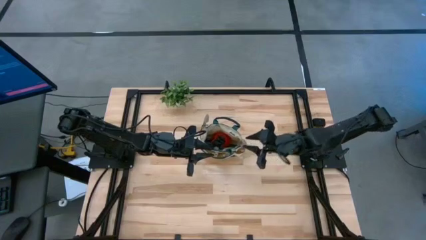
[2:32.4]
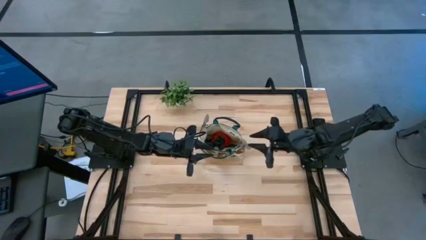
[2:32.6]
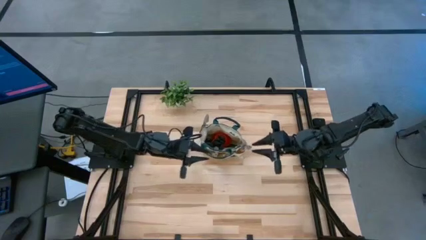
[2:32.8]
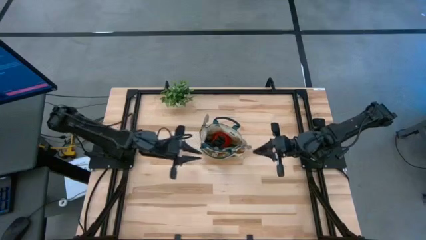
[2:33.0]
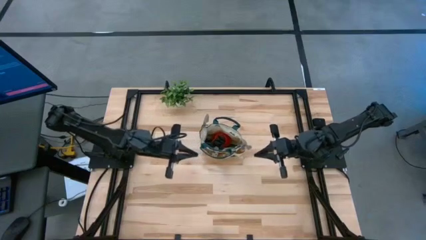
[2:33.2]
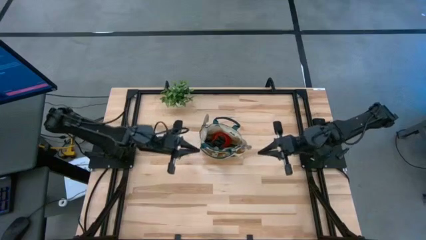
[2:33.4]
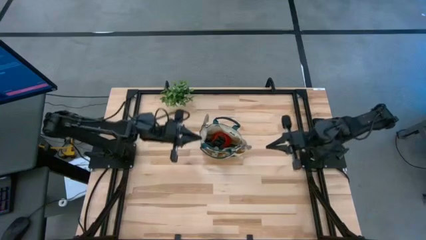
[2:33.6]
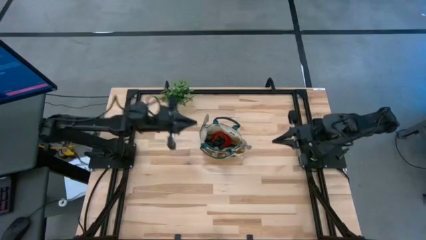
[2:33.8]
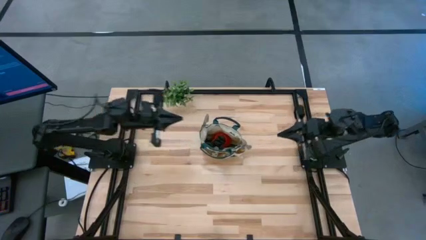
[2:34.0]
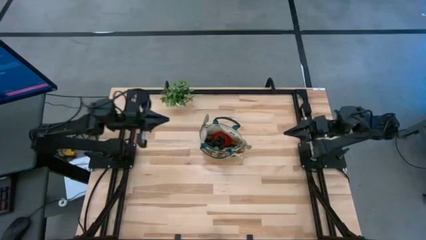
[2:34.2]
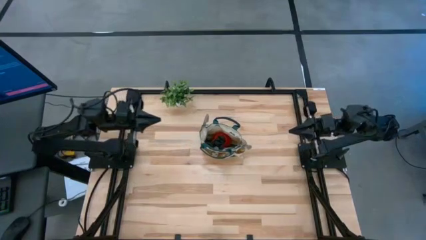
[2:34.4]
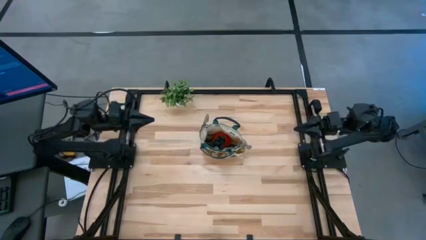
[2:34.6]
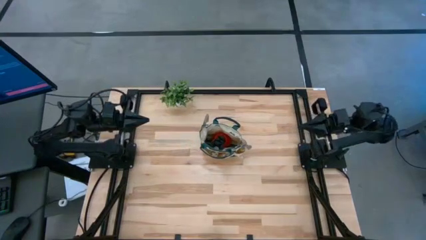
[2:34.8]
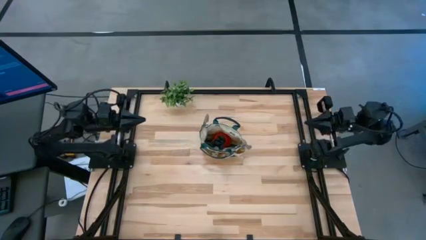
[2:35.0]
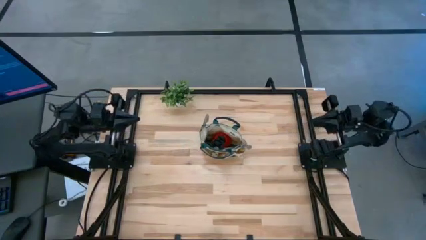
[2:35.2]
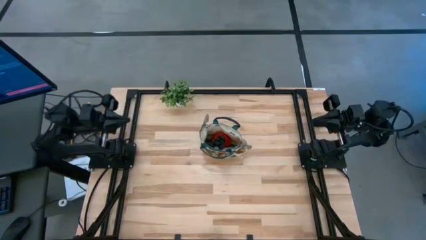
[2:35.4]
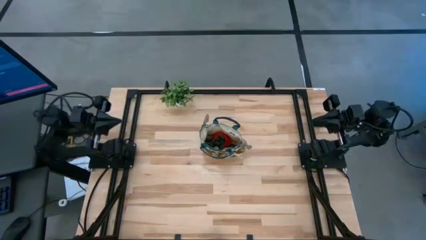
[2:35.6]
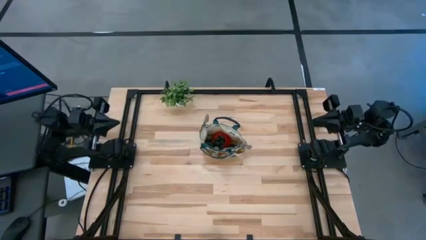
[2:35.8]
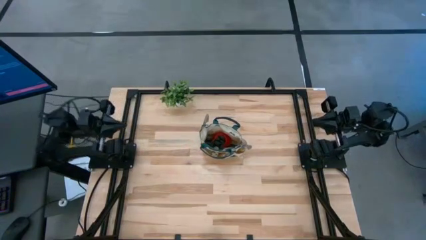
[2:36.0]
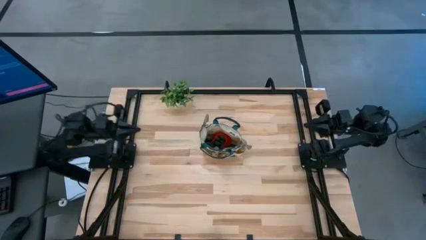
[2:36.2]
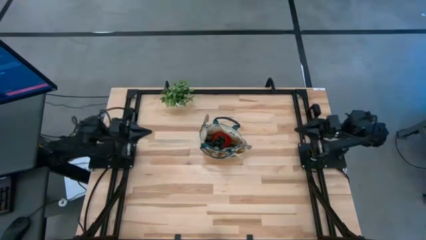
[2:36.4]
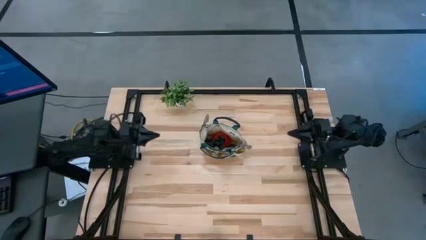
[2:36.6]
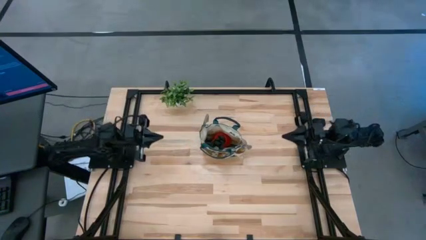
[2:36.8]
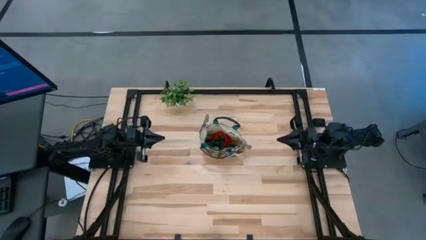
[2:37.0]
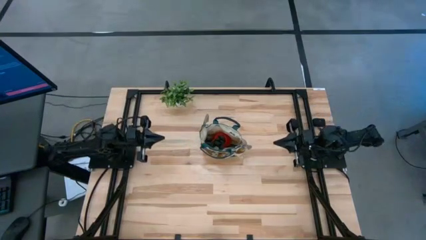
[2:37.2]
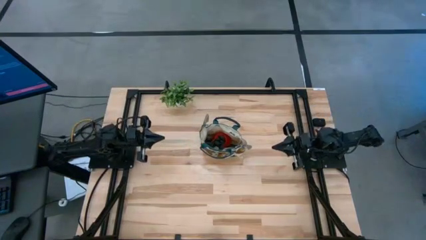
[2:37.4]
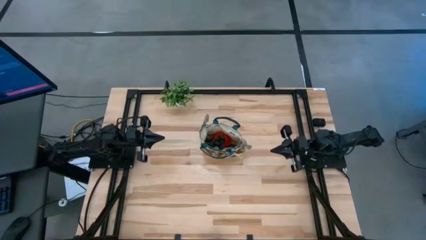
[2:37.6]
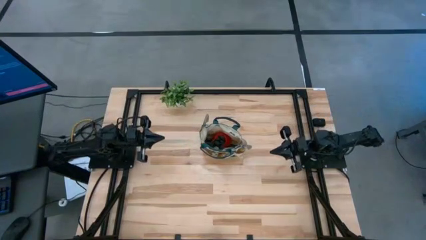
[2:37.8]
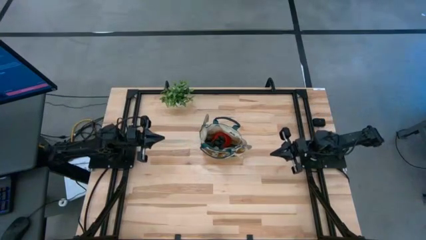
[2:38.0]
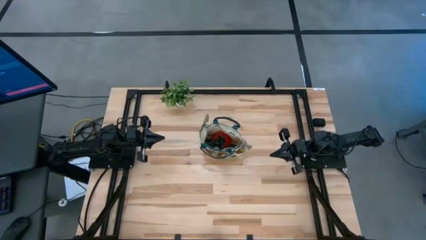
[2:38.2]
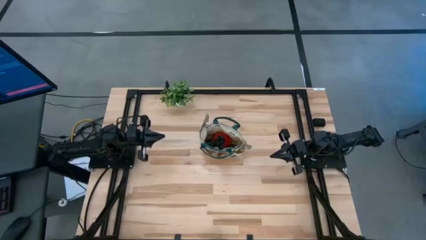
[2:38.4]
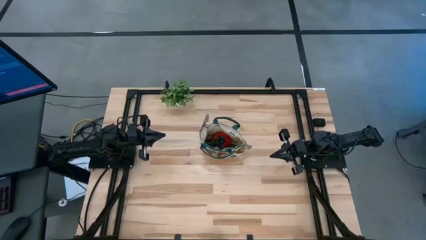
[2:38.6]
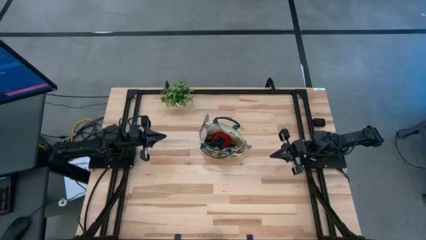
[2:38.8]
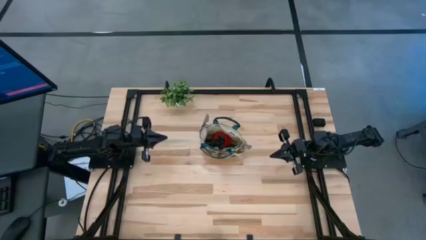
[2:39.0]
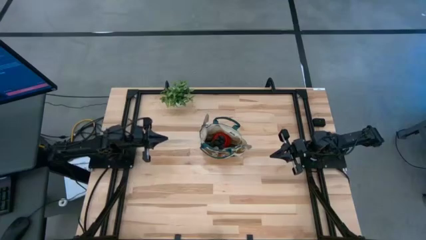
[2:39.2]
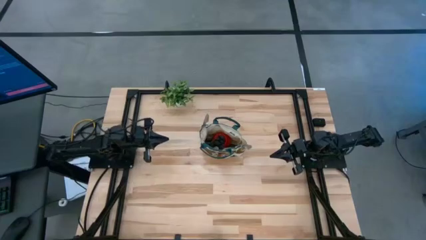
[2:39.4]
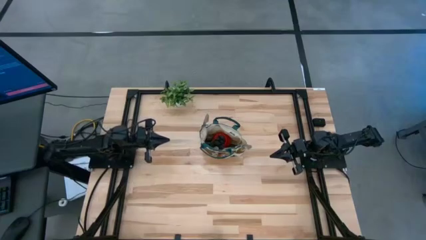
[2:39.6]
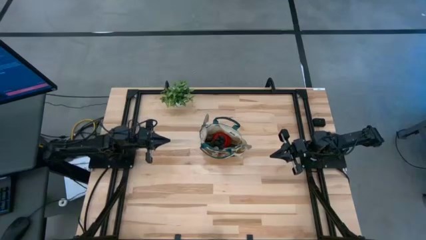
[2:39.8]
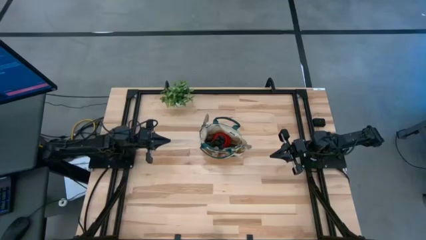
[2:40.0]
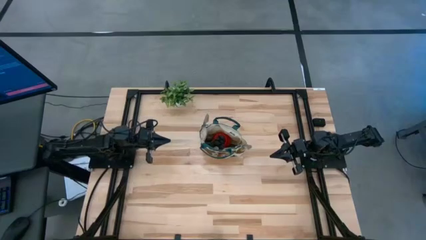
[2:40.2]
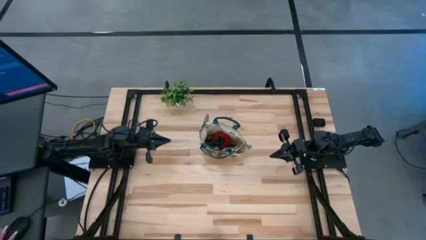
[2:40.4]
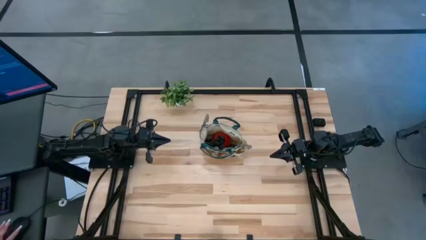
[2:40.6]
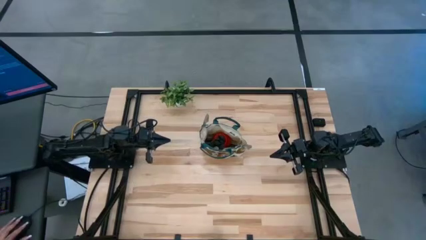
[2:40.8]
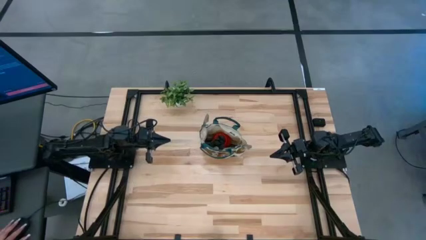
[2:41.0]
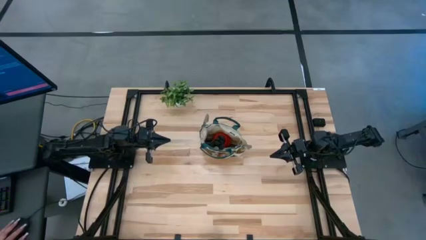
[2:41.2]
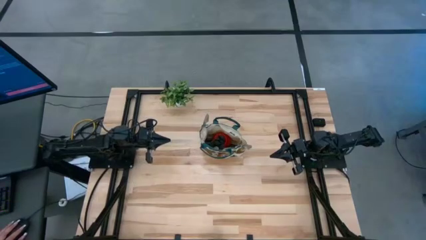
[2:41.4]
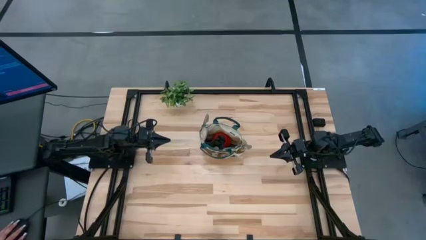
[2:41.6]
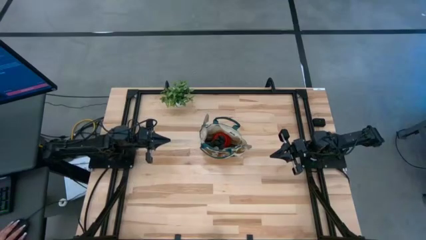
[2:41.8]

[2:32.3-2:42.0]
Task: Pick & Place Garden tools in Gardening bag
Return to home position

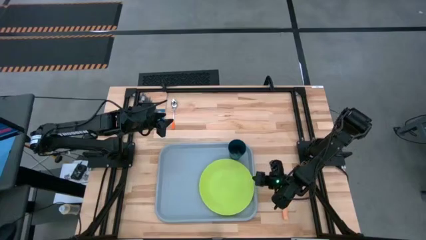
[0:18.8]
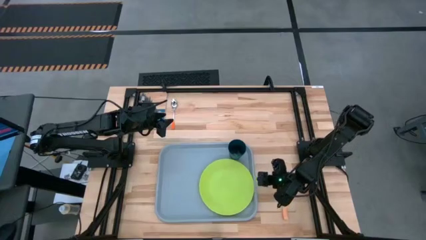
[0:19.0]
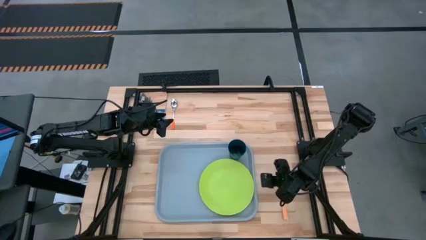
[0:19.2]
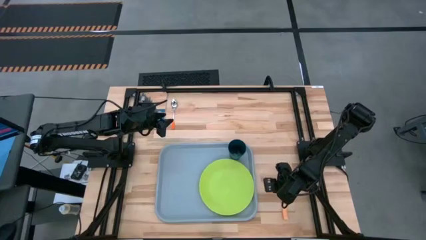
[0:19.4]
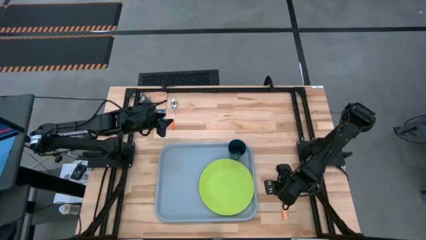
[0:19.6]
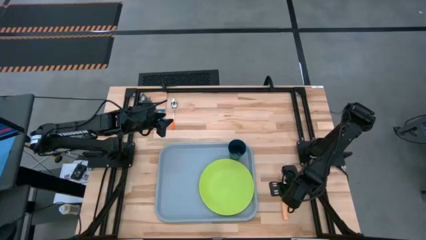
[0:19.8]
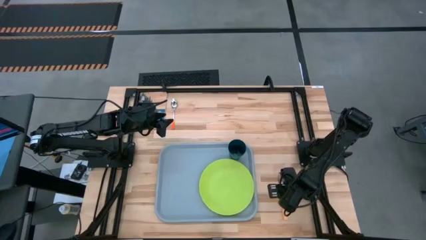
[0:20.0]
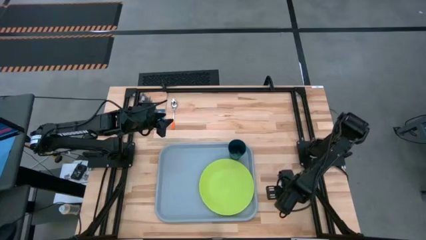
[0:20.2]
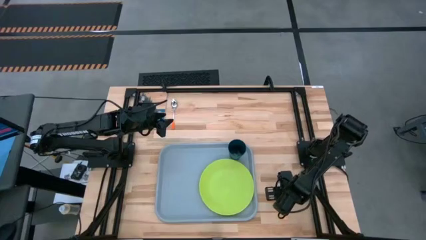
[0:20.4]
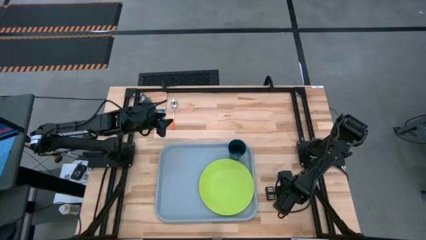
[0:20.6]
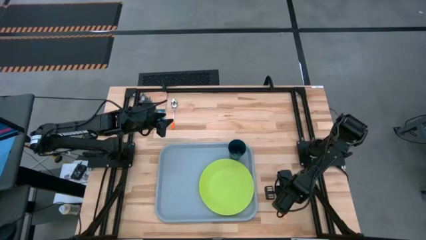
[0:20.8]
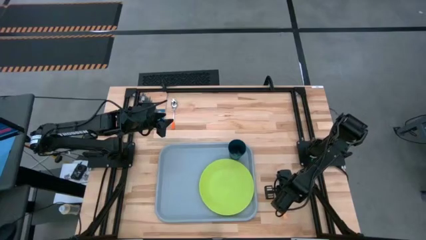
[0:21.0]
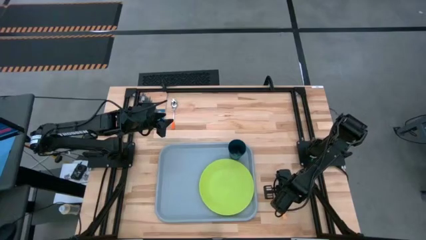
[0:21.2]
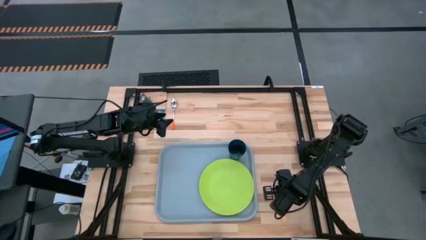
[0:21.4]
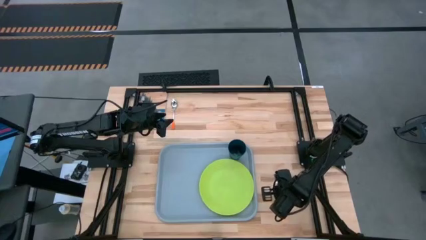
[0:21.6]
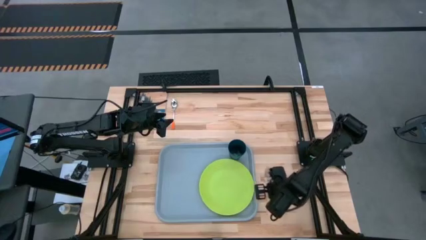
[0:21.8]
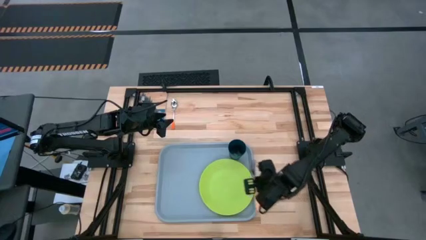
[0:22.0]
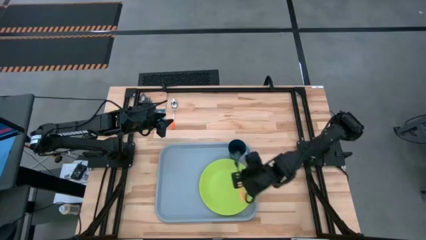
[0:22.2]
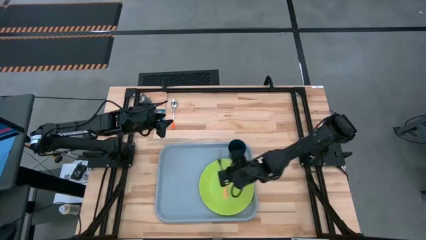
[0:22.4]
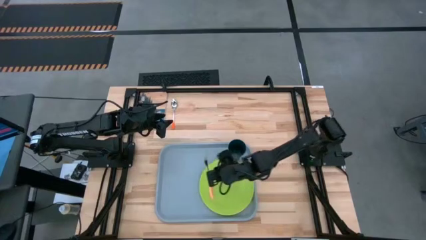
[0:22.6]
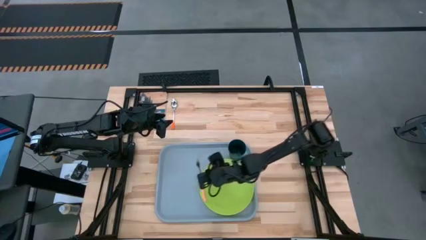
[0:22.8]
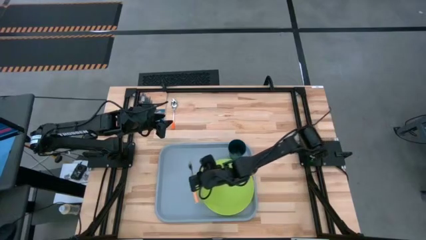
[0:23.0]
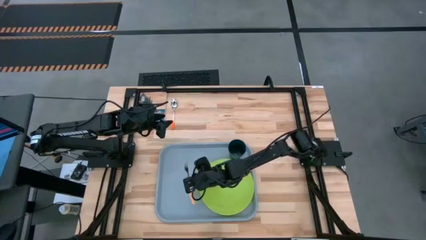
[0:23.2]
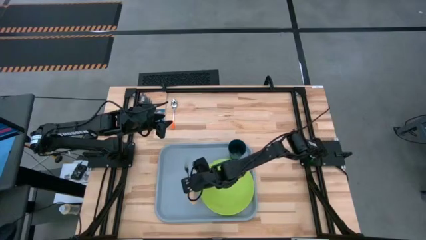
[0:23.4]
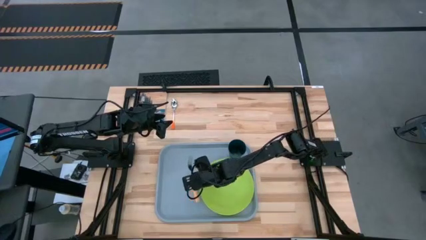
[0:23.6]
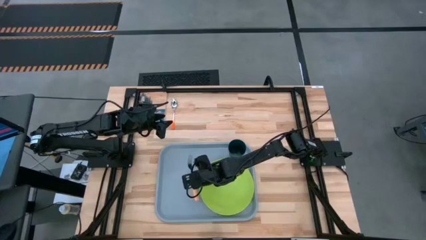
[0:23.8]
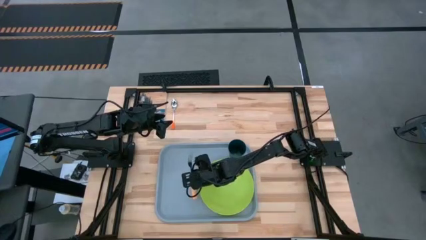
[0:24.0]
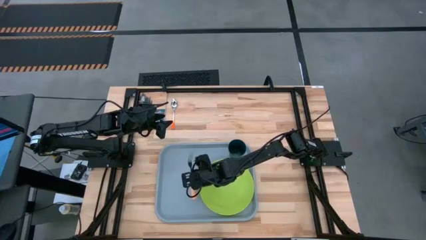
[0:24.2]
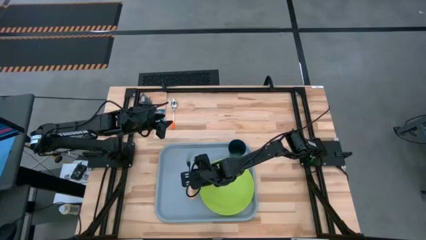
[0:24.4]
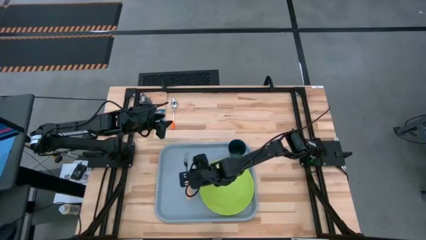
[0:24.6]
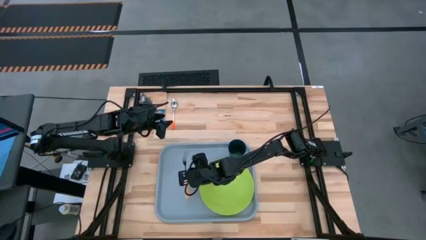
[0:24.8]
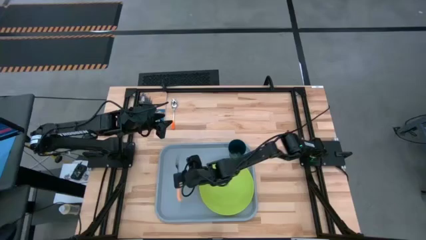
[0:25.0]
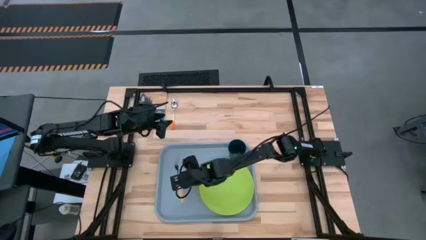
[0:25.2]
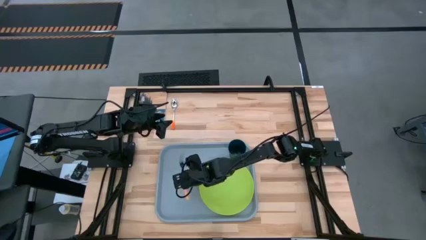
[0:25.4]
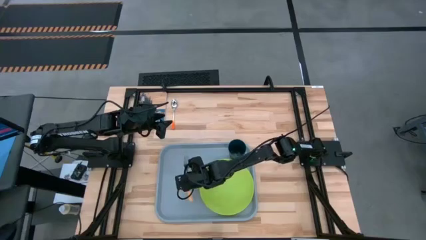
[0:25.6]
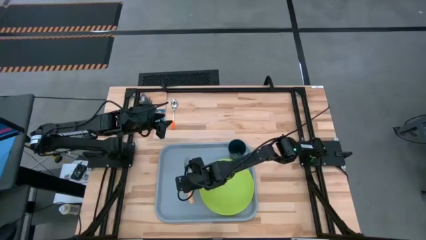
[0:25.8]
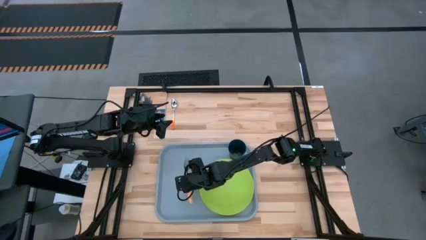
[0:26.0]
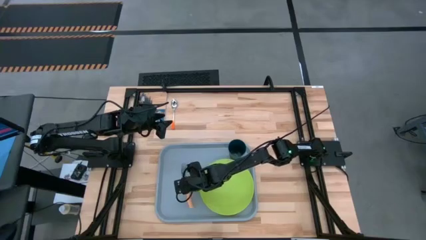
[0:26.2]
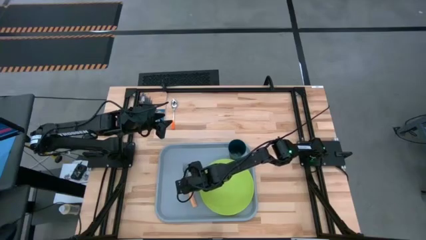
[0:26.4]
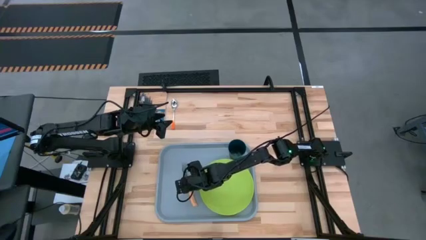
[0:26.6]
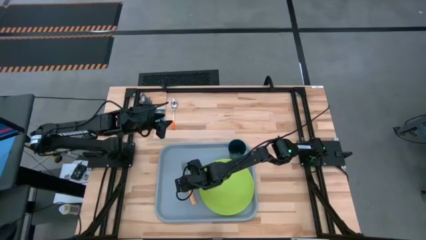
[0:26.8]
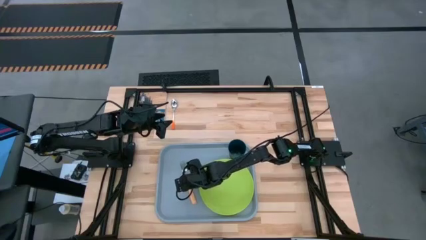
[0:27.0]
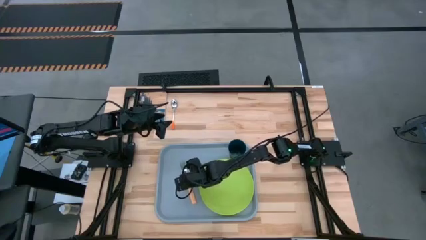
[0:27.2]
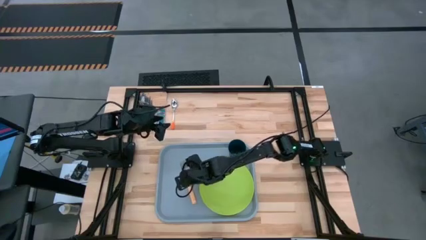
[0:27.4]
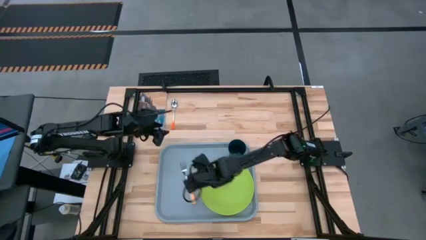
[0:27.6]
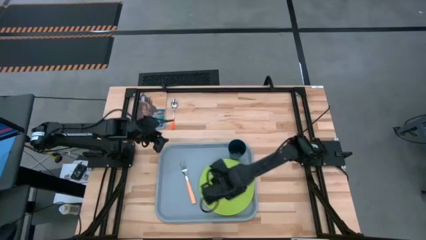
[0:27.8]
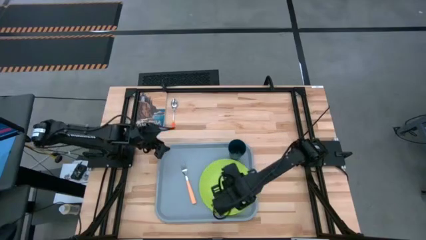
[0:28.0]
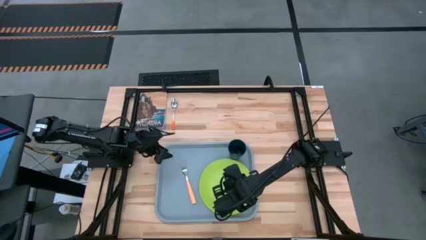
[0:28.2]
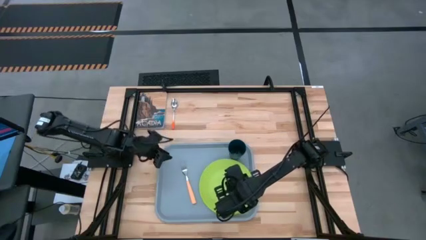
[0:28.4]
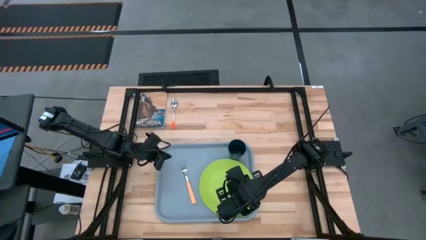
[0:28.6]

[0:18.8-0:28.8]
Task: Pick and place plate/cup/fork/spoon on tray
Put the yellow fork on the blue tray to the left of the green plate
